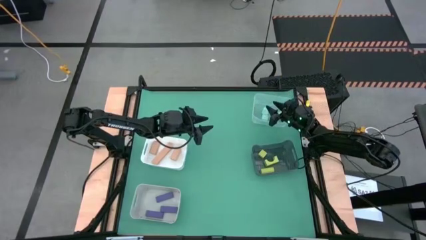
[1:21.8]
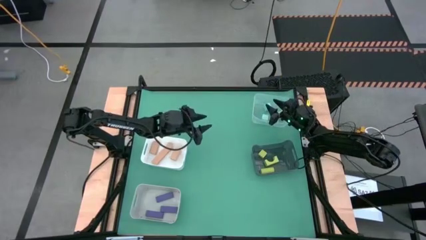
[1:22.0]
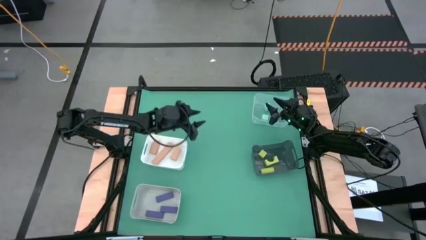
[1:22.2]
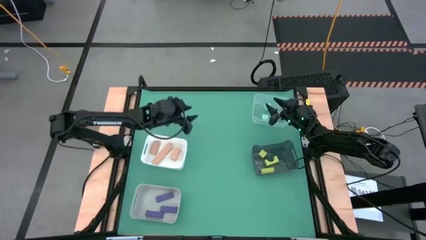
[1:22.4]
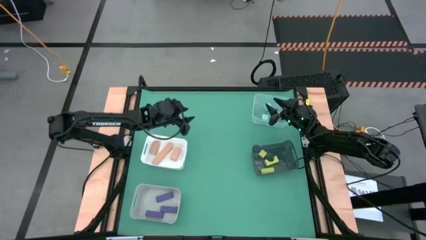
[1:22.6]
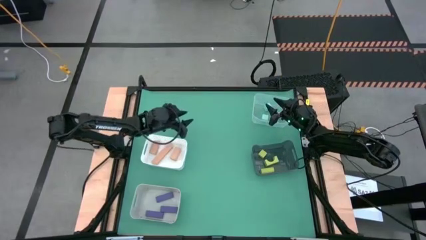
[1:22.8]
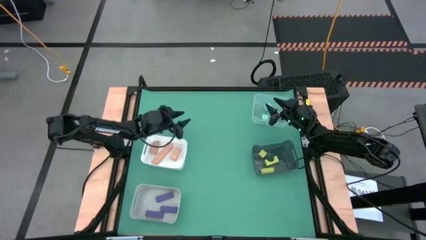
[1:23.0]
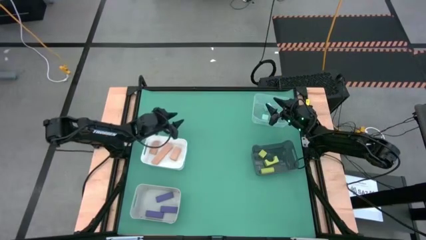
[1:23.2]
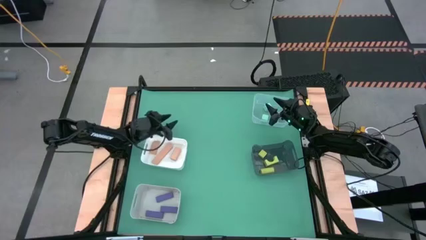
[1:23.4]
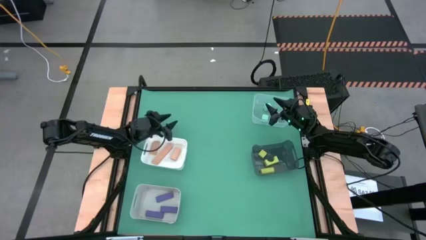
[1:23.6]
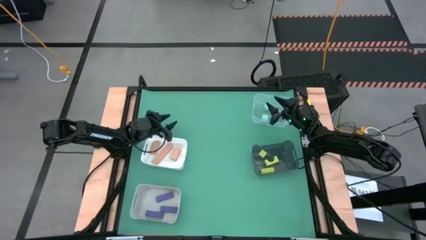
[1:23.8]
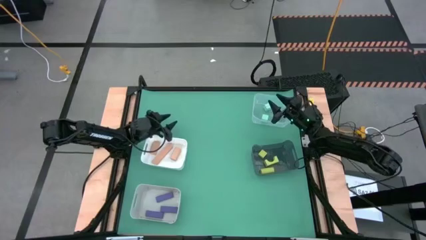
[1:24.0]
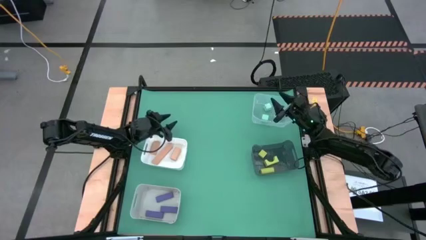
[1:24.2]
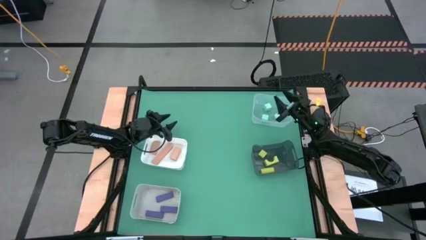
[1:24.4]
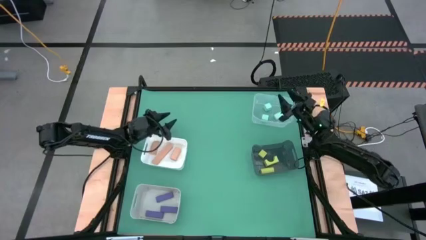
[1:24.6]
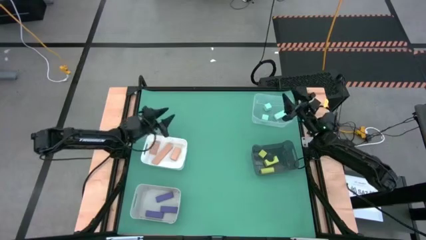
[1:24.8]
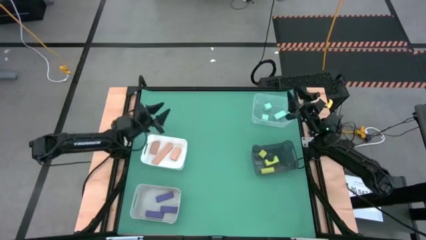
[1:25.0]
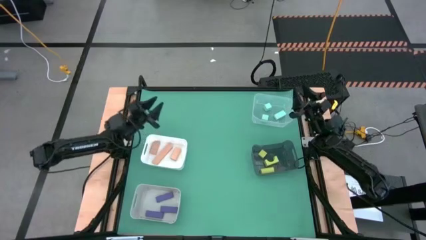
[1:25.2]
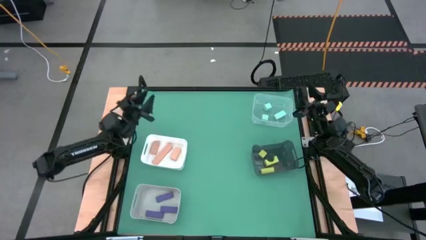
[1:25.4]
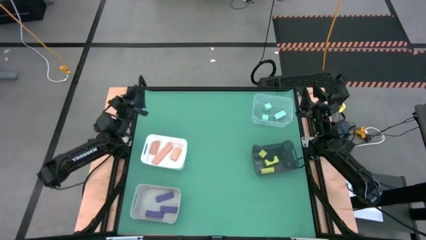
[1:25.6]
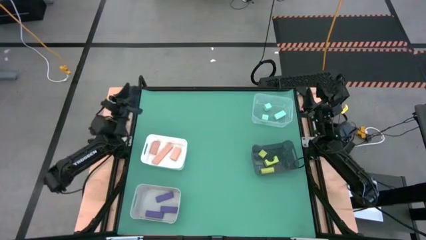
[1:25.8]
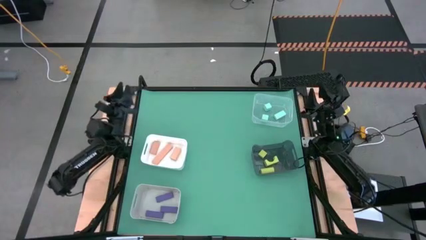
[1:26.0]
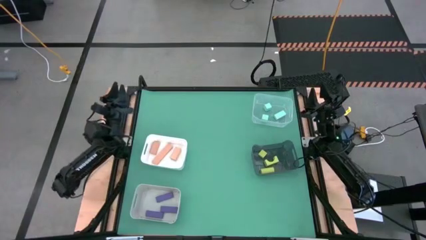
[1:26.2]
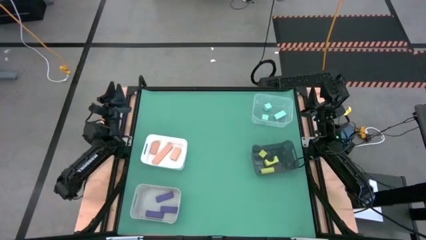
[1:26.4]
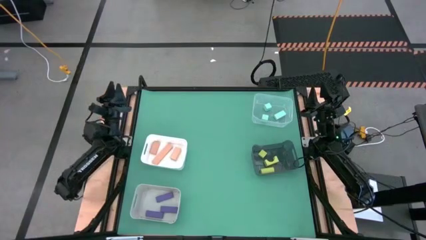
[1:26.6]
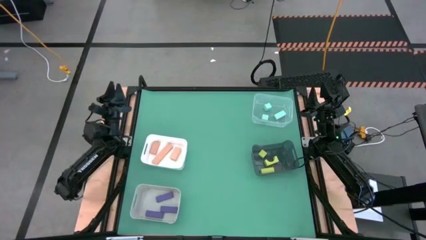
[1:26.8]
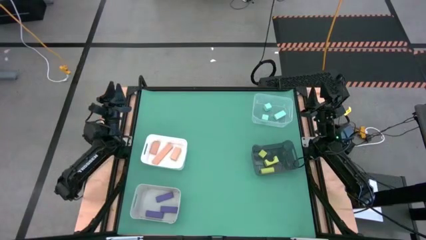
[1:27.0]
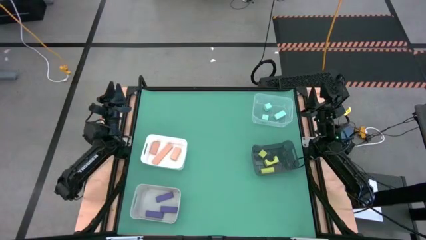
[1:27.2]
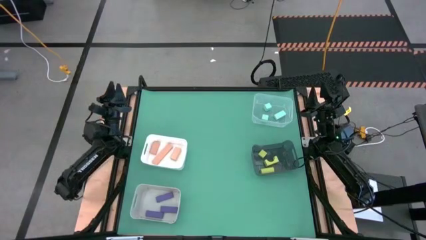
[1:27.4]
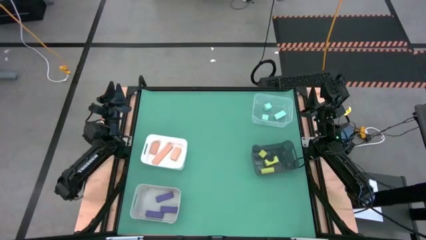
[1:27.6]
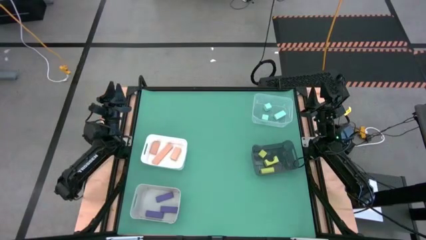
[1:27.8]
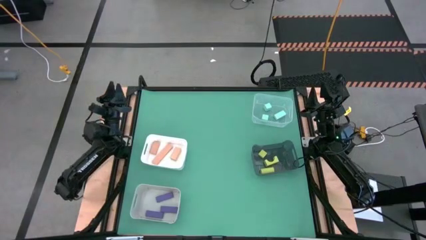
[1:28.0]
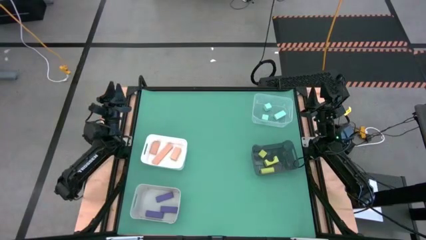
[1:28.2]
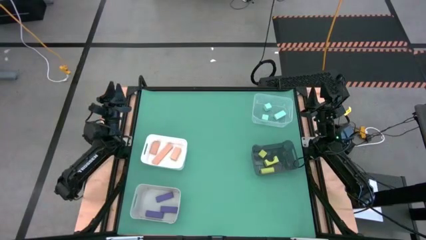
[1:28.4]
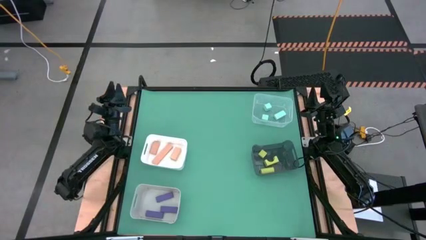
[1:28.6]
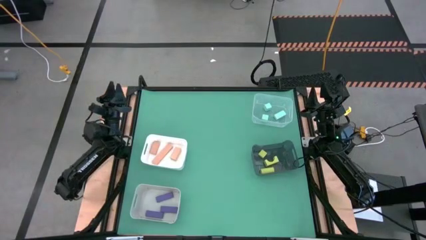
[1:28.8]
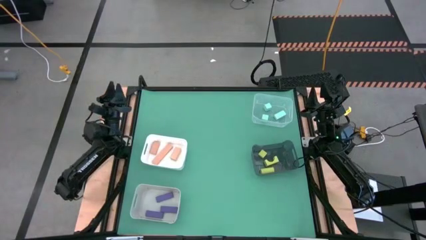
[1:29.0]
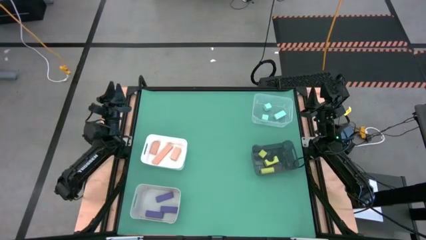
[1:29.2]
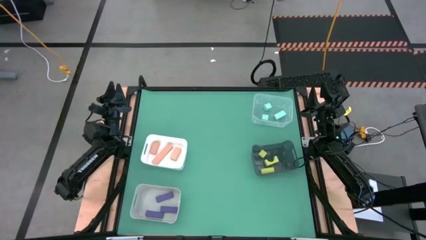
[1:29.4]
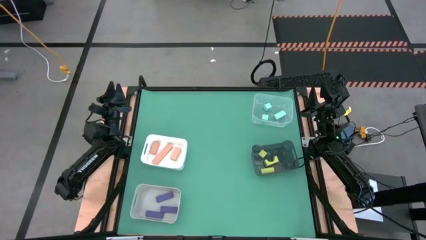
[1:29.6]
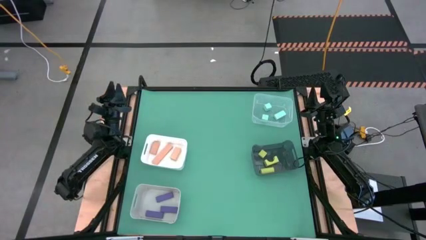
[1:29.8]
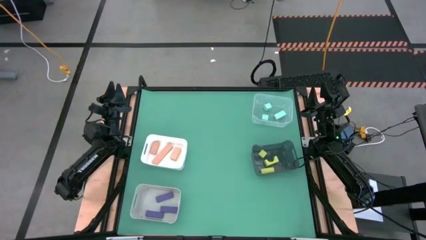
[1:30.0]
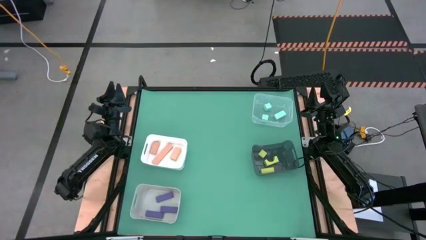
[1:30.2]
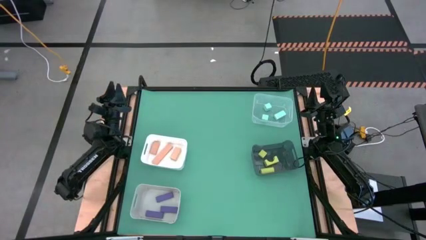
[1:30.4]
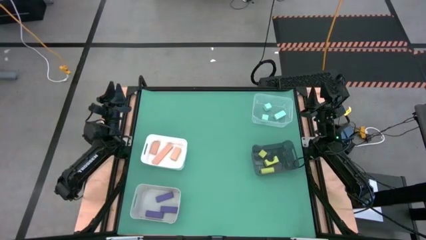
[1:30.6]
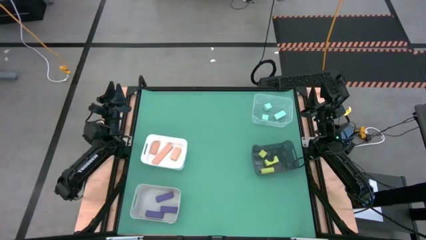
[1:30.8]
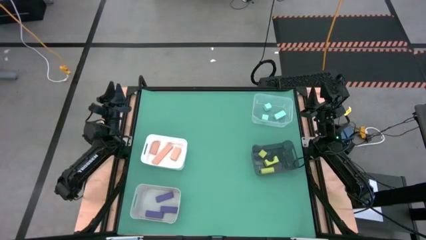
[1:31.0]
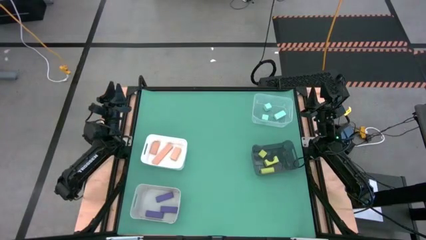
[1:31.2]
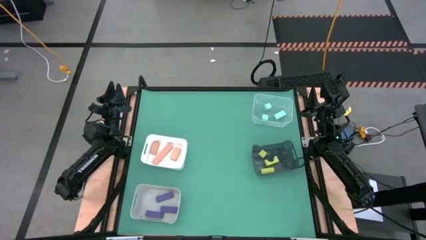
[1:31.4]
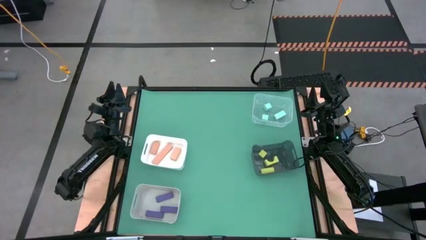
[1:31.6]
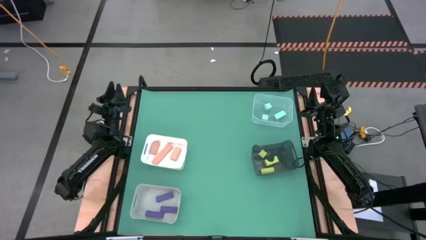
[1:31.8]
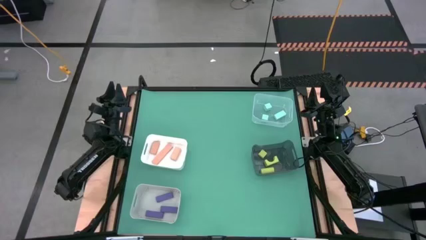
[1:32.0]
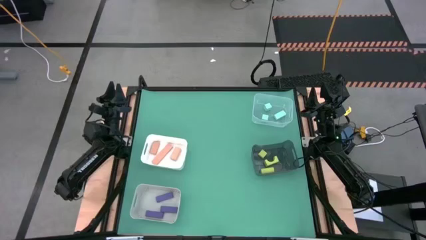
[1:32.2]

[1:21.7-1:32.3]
Task: Sort & place blocks by color
Return to Home Position

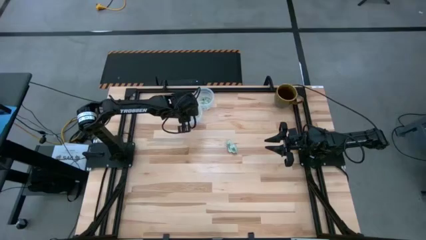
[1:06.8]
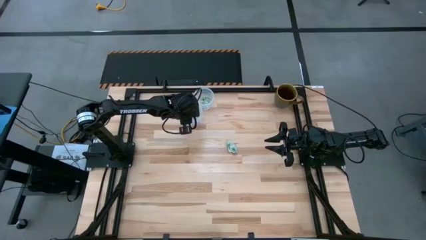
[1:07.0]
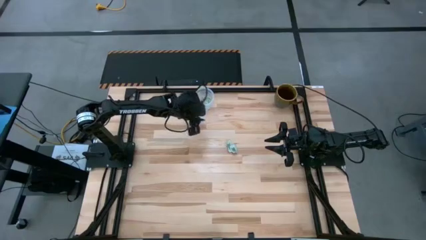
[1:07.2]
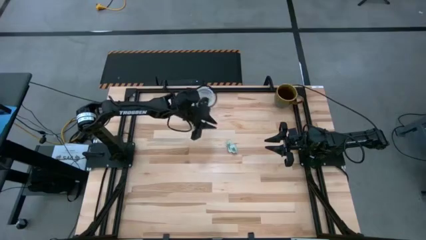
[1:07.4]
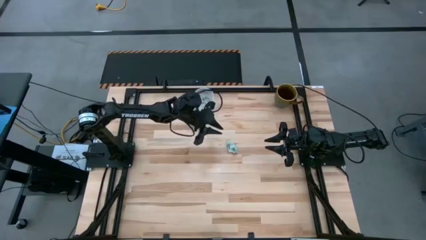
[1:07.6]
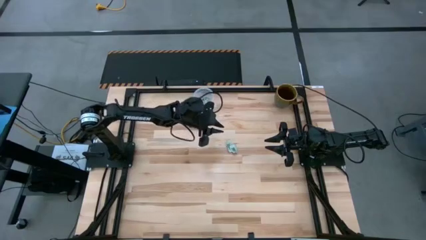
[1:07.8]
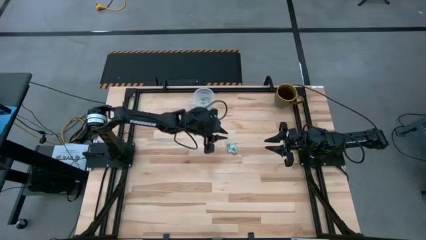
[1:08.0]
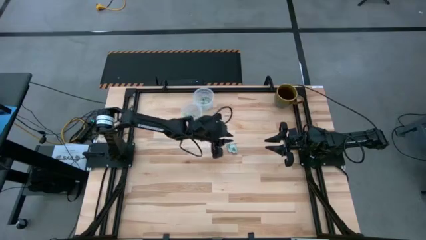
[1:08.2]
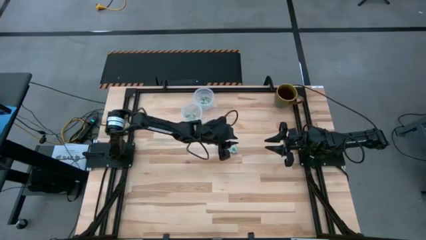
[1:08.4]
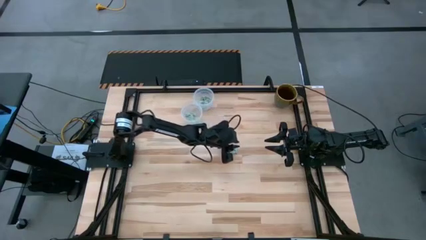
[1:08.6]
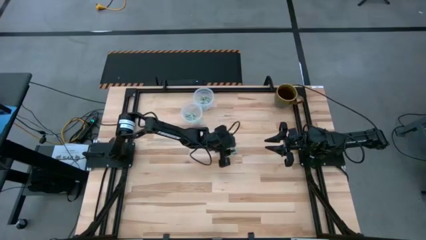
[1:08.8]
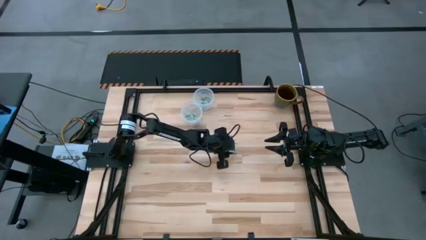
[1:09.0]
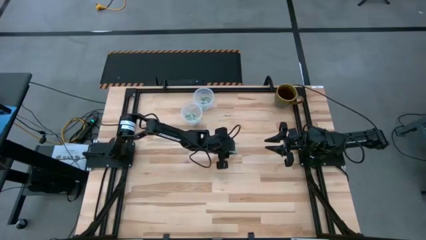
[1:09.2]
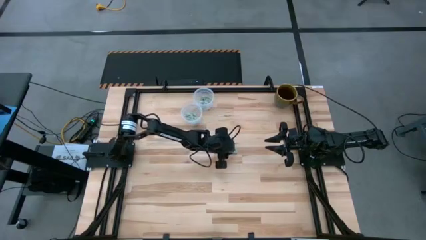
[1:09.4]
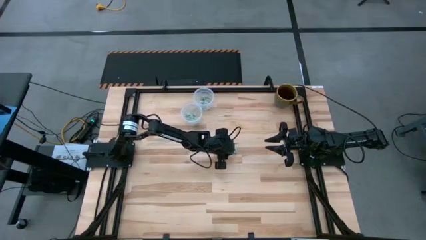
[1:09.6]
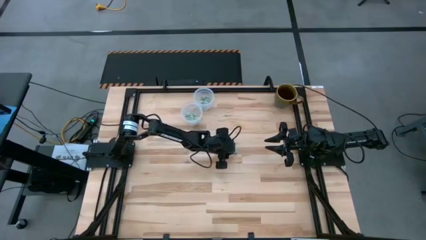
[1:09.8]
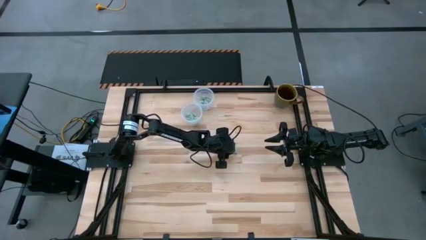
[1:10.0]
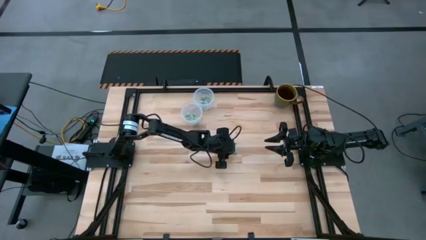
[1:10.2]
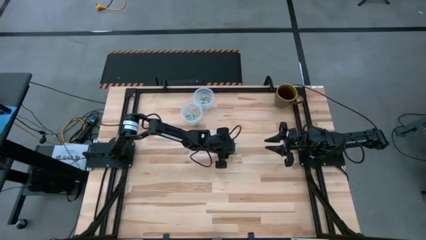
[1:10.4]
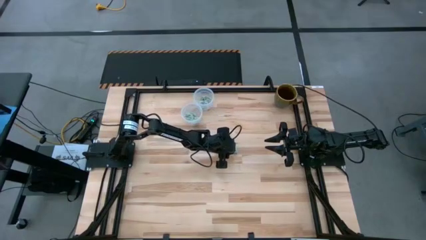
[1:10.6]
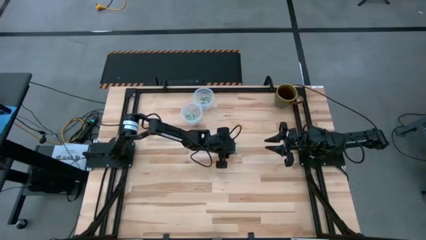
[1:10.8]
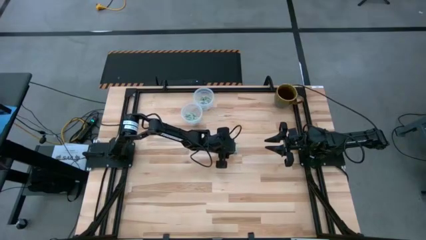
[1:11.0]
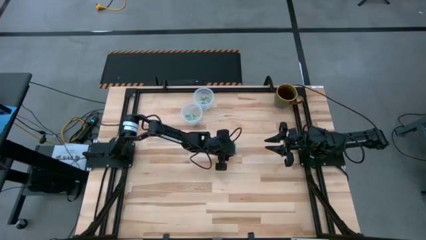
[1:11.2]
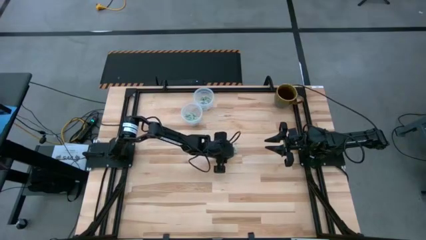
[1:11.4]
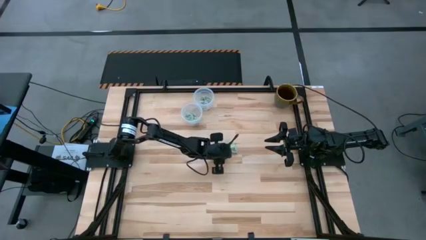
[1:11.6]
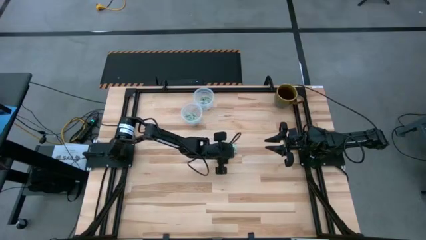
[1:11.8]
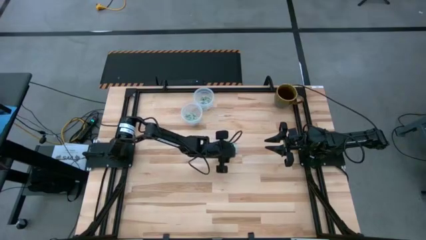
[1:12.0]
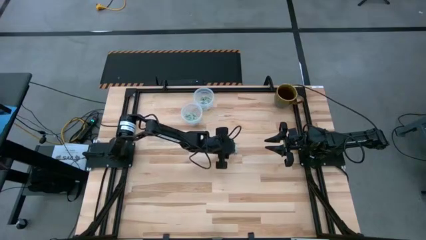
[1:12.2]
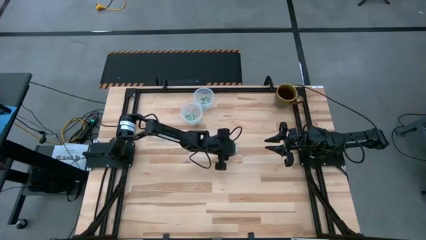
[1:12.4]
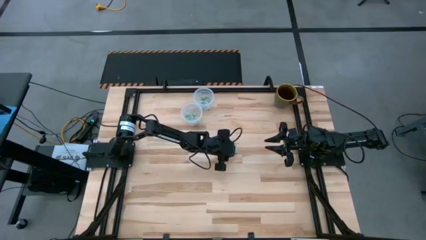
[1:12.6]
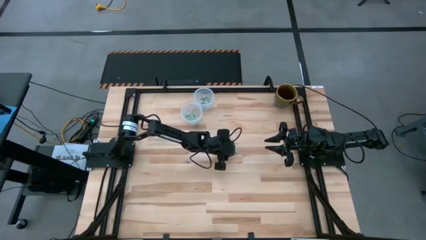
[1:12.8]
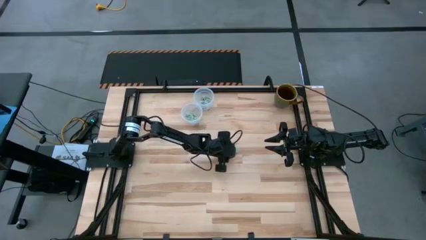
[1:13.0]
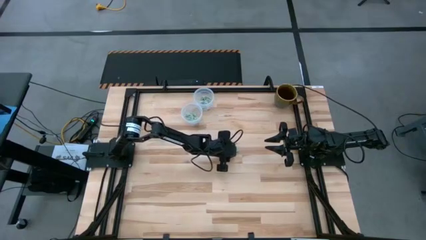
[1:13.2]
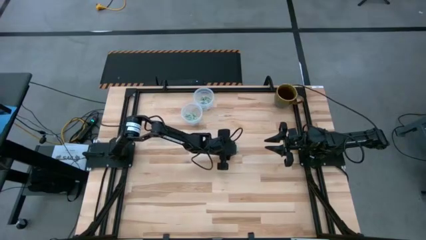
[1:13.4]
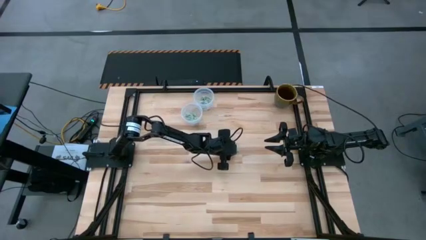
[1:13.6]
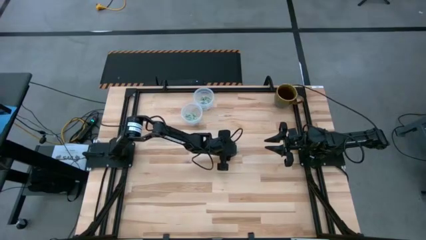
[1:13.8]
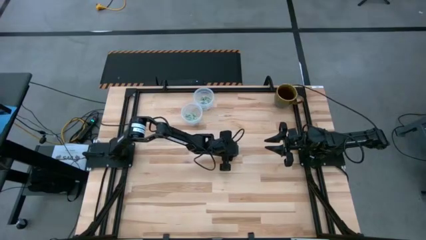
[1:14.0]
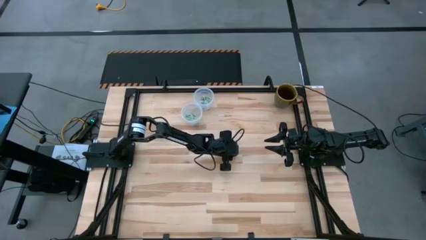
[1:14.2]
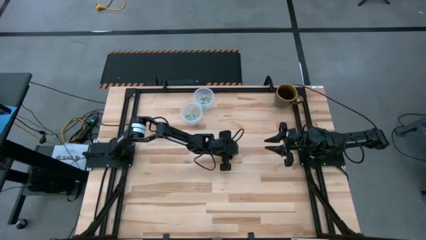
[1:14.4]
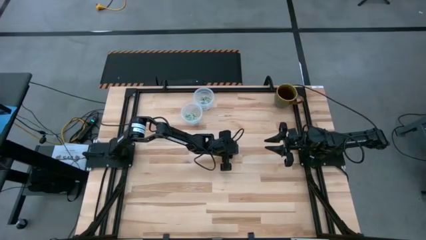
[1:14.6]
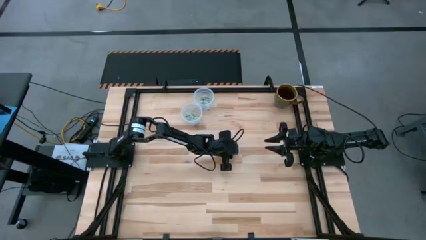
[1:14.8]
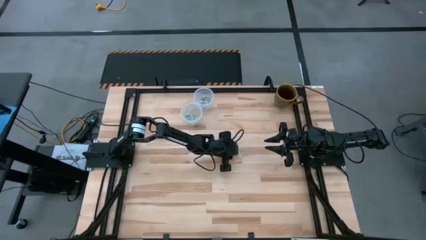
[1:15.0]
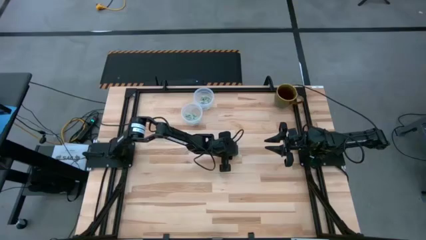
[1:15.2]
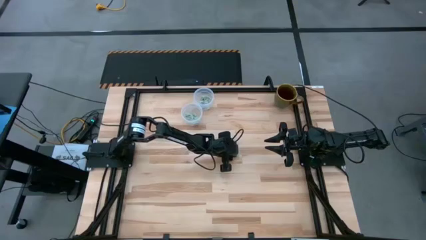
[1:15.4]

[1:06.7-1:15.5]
Task: Pick and place items into bin
Put the right stevia packet into the bottom bin
